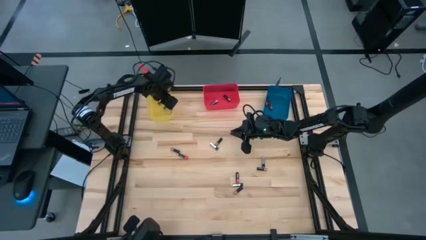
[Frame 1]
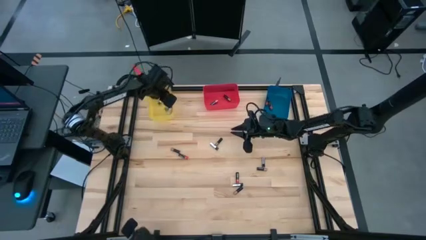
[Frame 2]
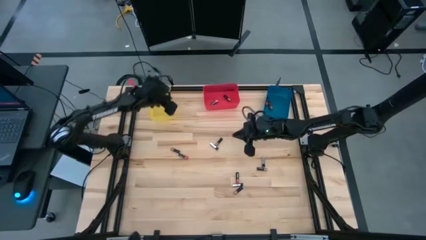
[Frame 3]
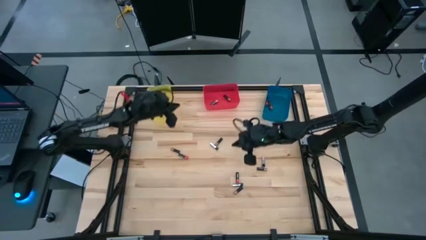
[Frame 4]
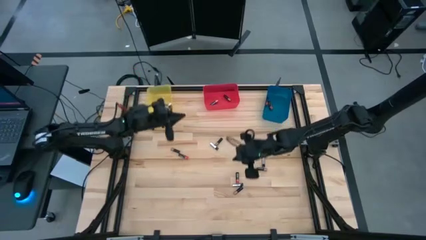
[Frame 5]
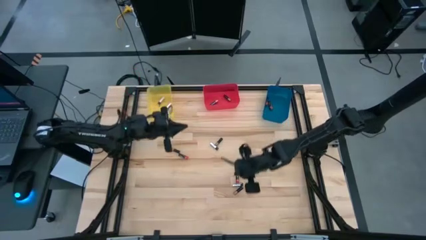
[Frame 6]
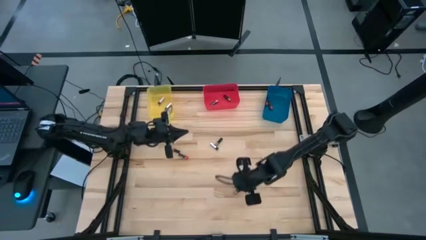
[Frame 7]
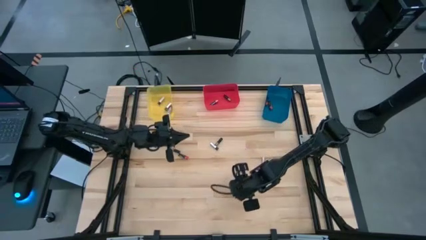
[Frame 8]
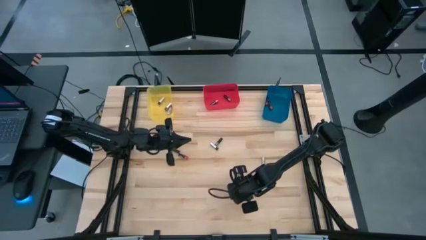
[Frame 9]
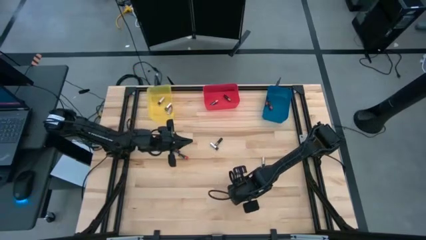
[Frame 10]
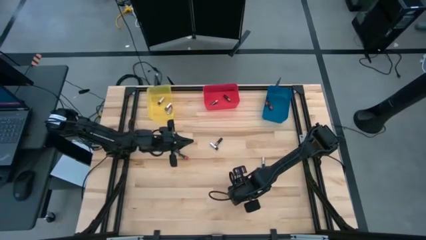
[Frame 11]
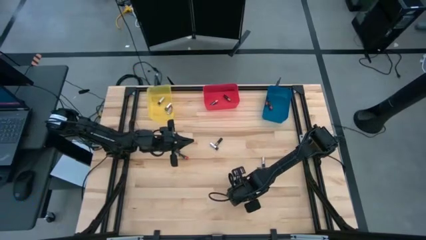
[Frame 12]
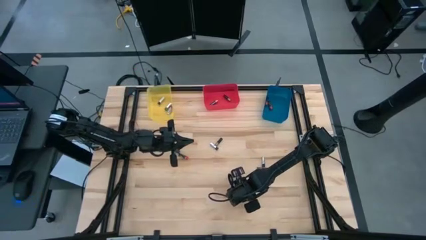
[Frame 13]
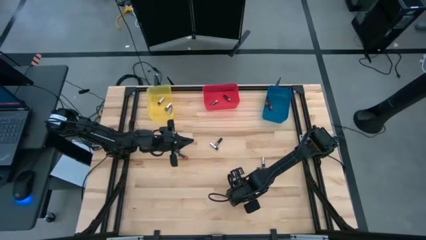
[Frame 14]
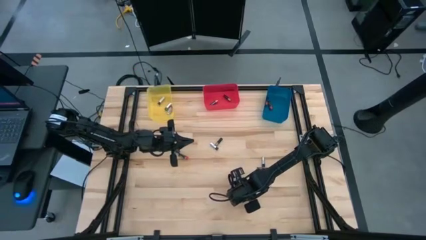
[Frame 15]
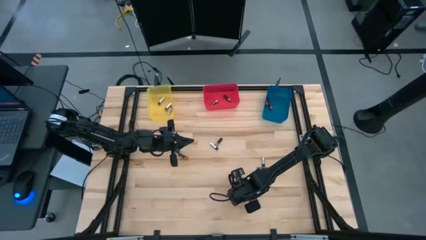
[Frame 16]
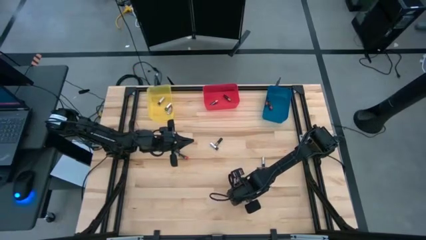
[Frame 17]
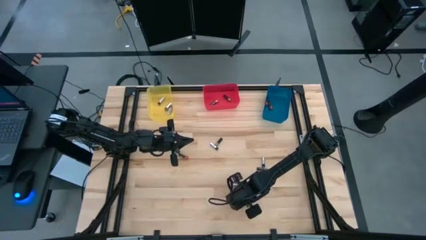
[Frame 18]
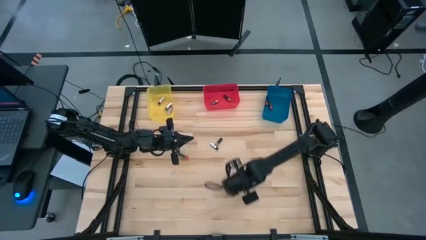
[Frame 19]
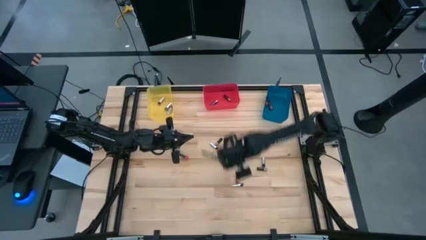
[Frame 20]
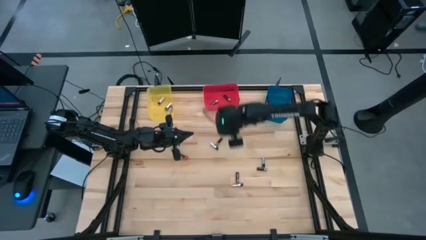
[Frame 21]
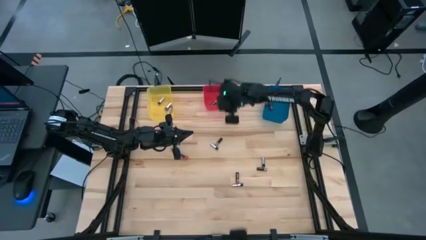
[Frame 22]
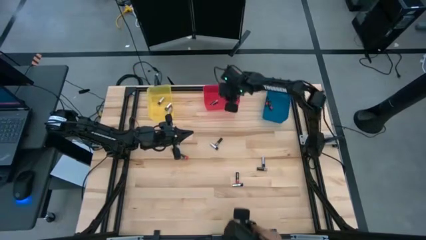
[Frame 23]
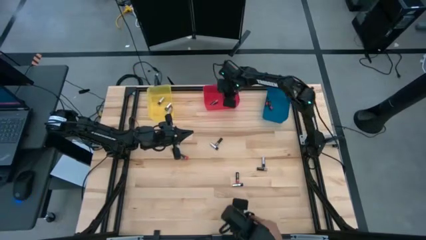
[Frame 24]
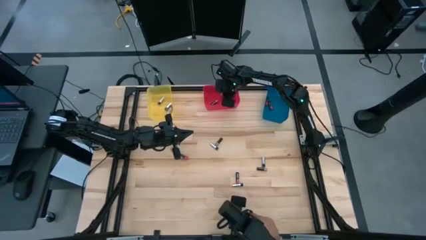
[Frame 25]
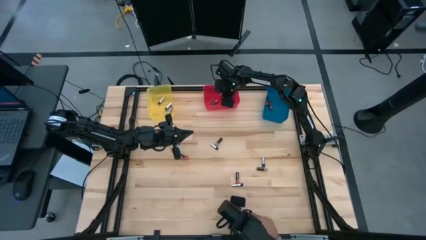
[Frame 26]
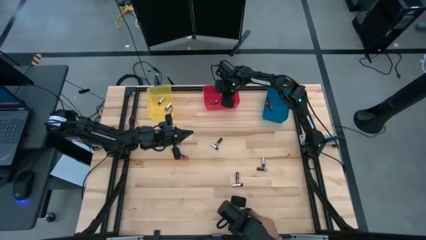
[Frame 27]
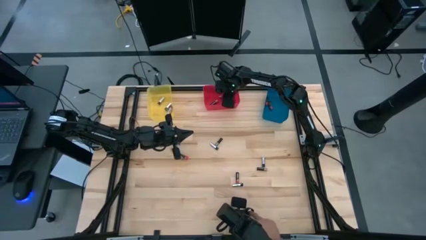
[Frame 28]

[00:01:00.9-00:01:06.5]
Task: Sort batteries
Put the brown battery into the red bin

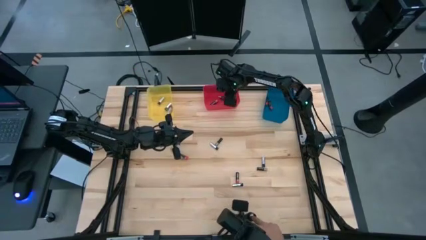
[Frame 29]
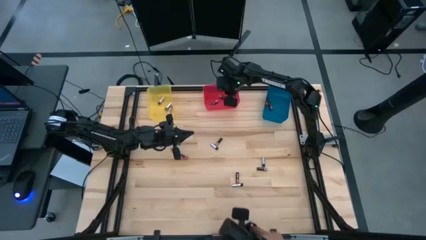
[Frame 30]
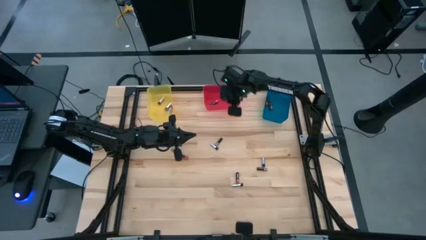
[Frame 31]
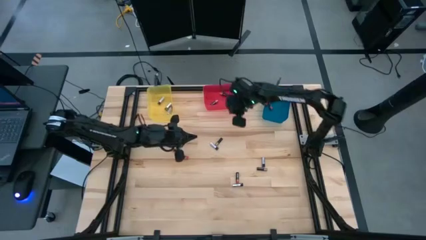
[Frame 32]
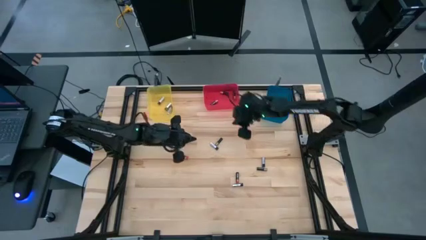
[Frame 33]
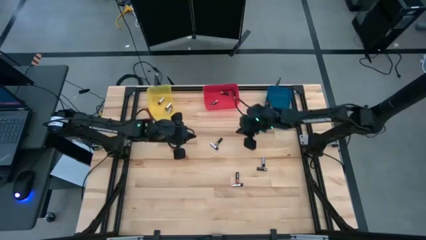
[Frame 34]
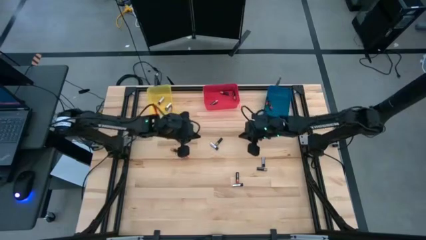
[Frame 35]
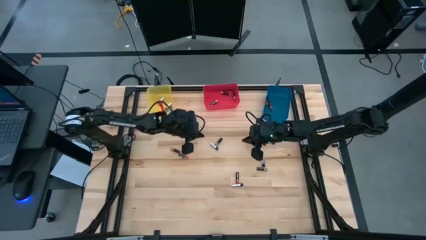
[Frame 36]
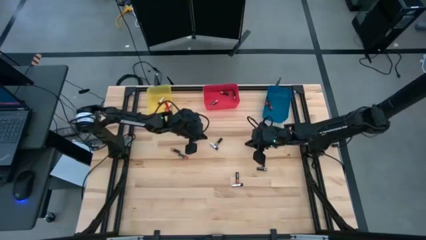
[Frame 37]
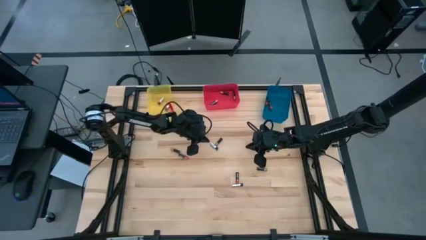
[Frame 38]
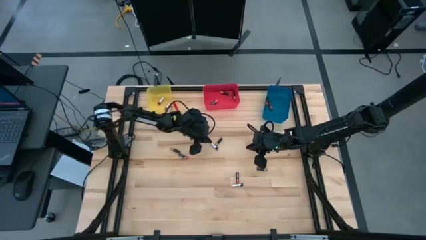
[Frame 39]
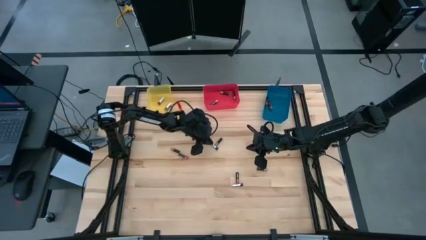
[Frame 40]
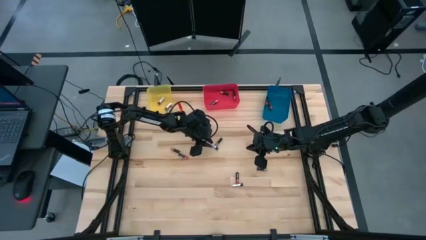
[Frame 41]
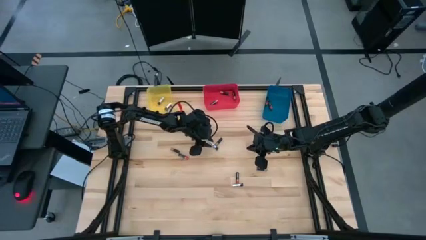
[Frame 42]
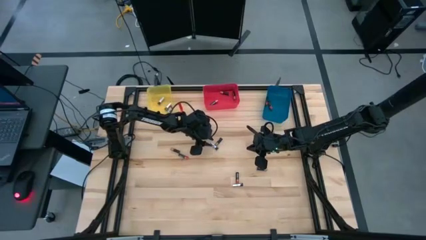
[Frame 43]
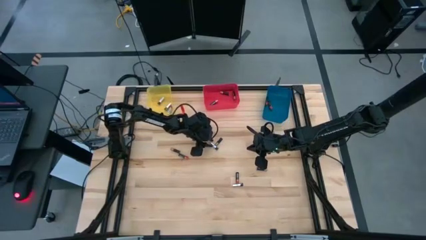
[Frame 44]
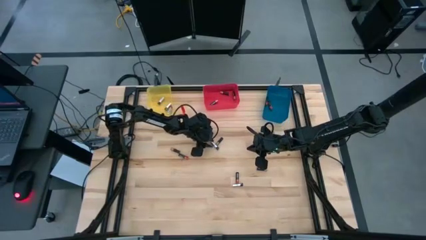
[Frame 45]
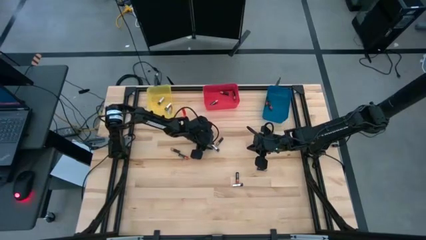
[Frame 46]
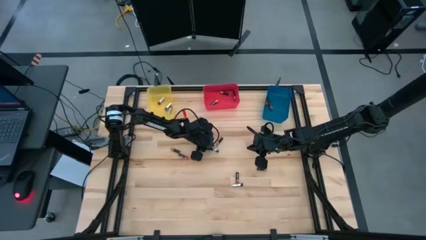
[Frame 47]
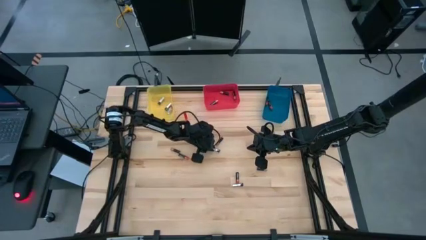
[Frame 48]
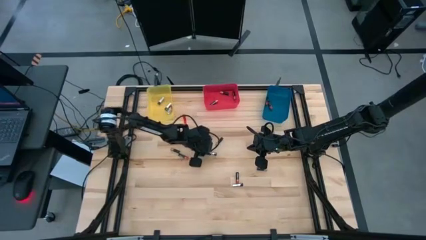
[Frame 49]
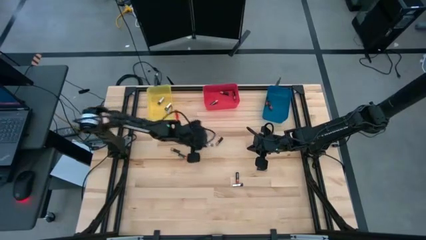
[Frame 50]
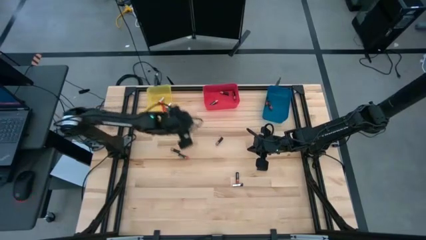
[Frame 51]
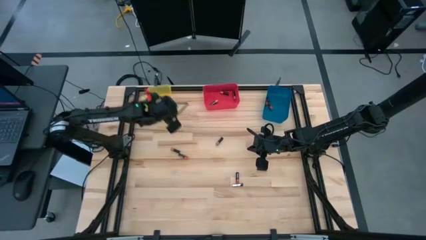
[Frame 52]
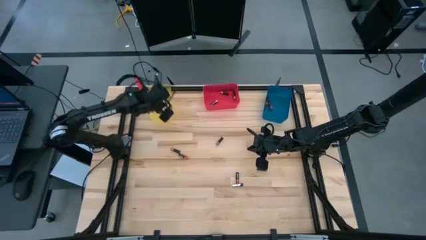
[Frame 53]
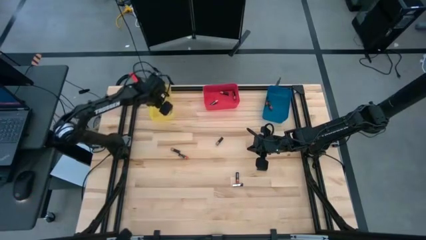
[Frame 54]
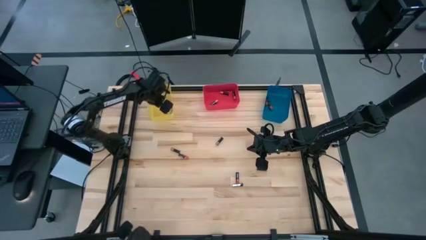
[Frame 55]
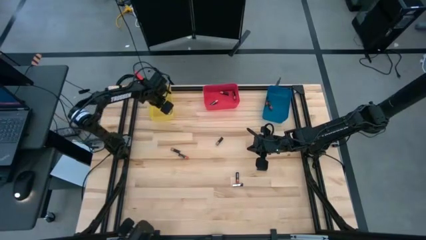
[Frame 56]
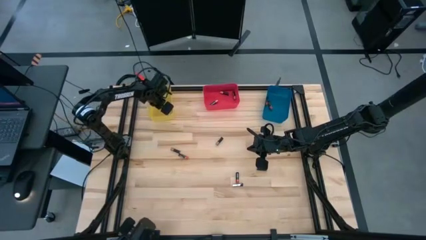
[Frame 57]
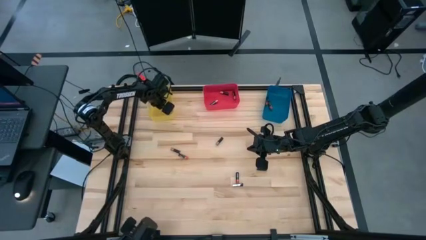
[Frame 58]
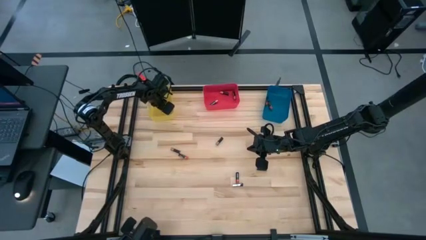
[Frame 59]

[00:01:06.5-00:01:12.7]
Put the silver battery into the yellow bin

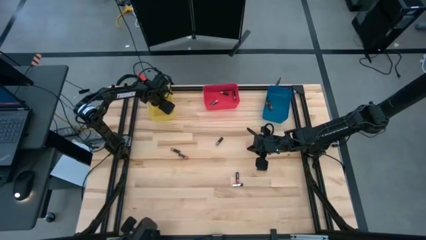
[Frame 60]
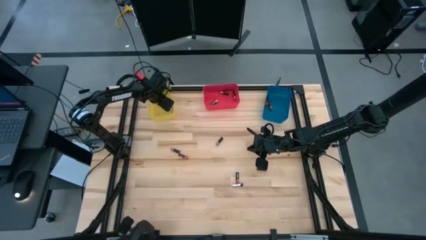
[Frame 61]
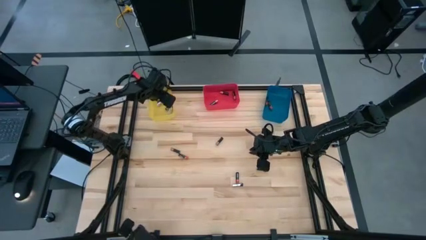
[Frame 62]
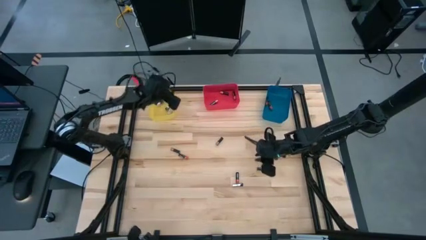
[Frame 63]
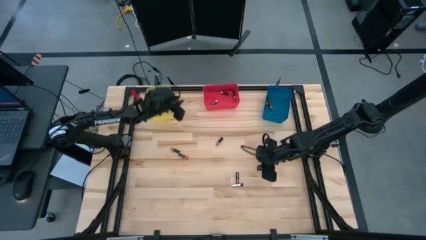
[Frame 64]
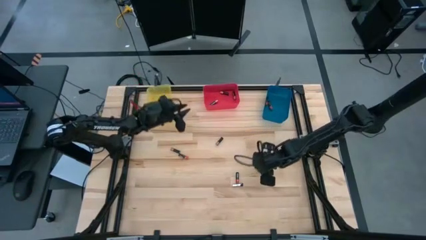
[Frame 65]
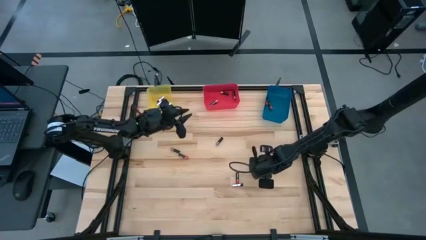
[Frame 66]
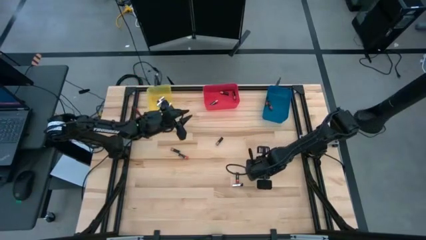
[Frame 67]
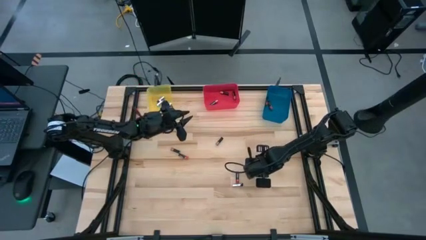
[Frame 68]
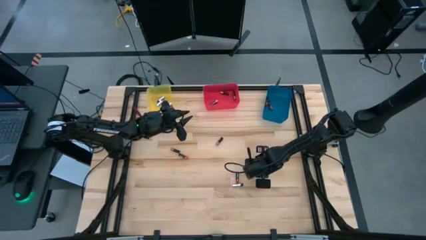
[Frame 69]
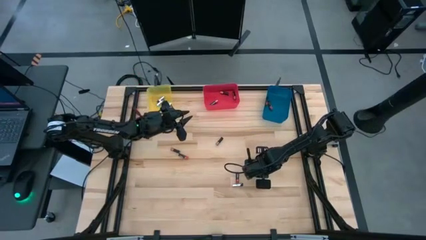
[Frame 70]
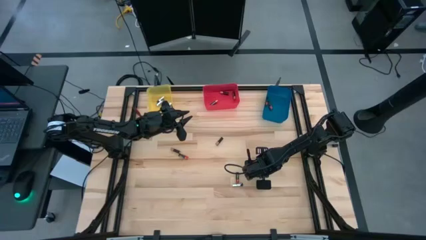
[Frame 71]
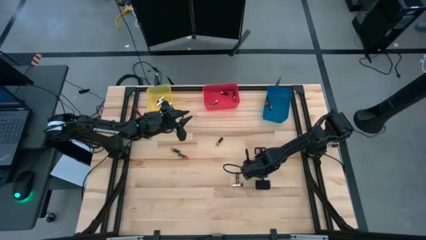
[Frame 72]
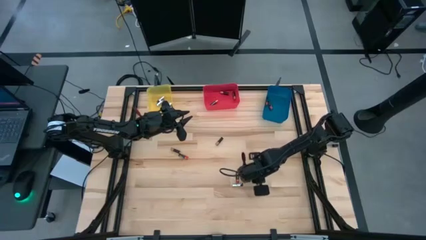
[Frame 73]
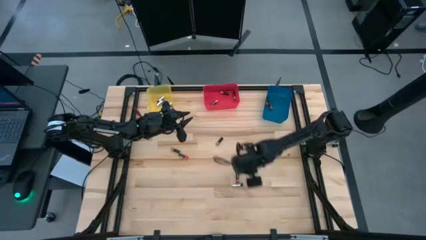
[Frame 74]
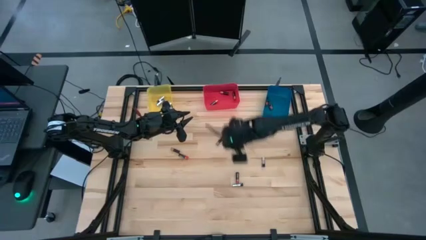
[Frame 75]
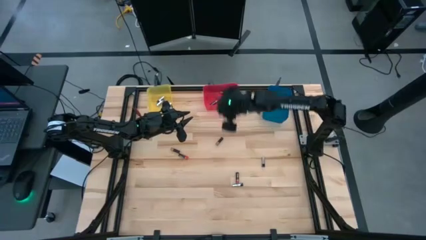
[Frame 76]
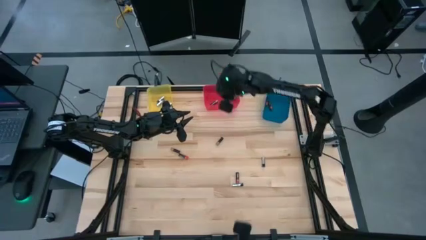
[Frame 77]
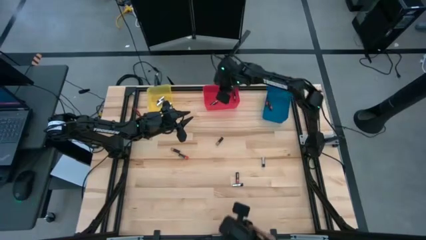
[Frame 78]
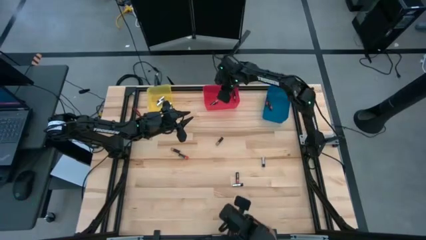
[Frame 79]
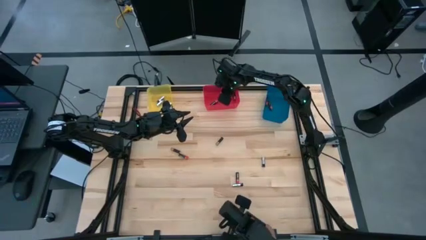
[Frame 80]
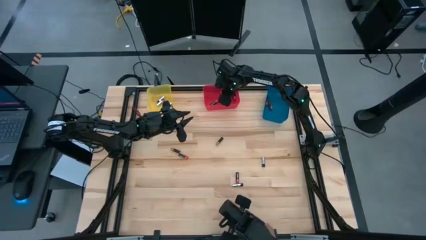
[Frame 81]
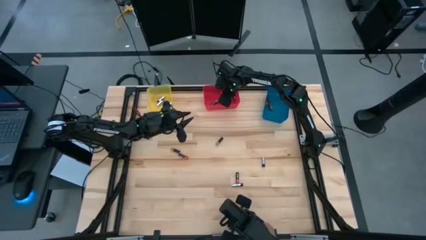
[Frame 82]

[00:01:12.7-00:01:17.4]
Put the brown battery into the red bin
